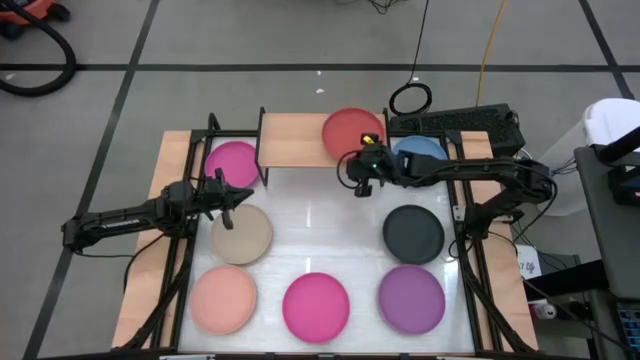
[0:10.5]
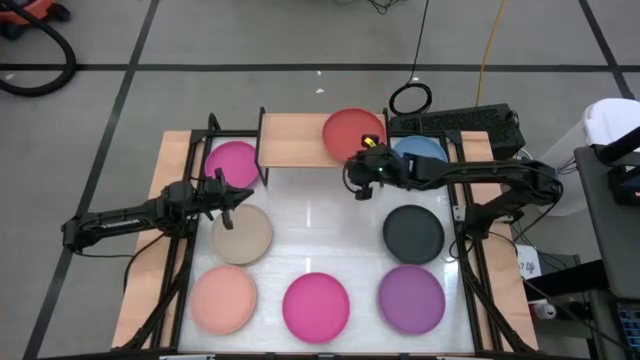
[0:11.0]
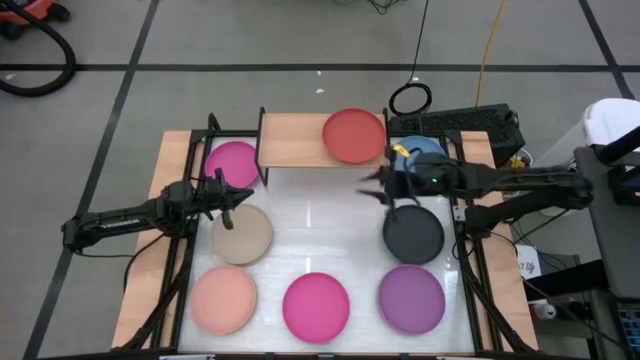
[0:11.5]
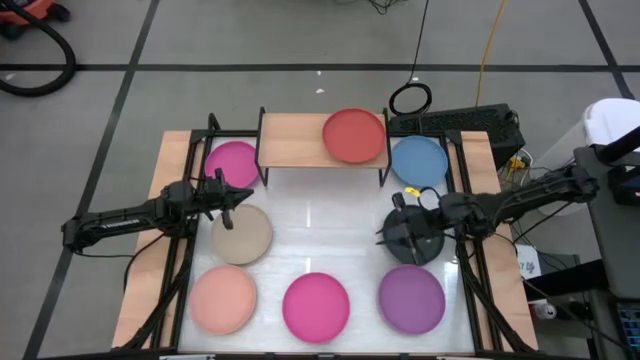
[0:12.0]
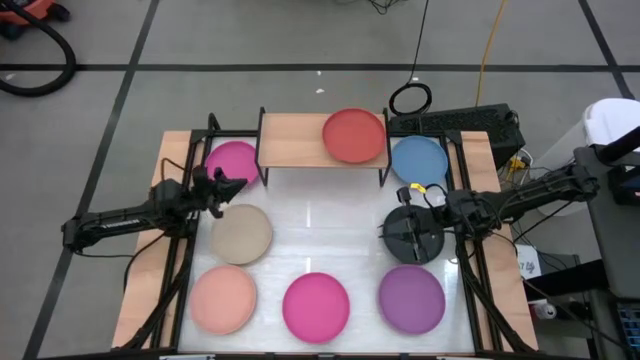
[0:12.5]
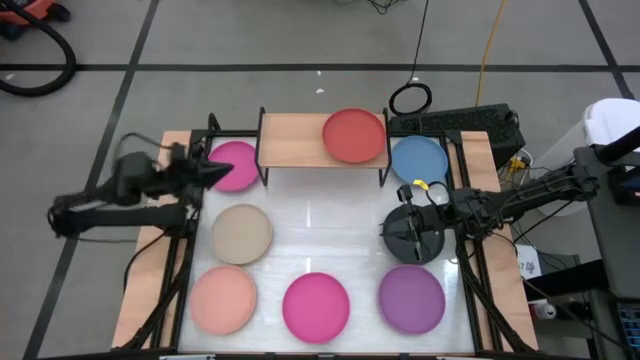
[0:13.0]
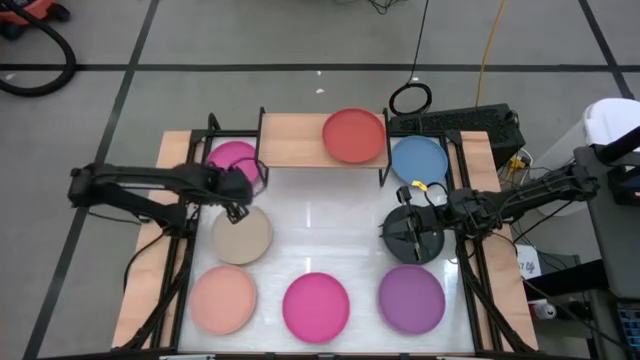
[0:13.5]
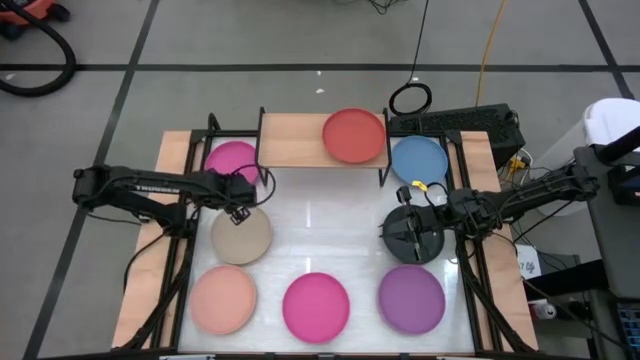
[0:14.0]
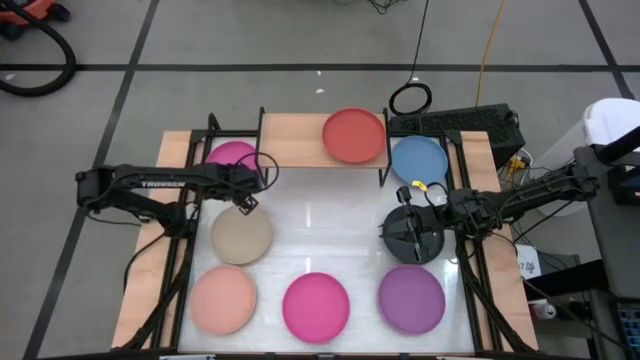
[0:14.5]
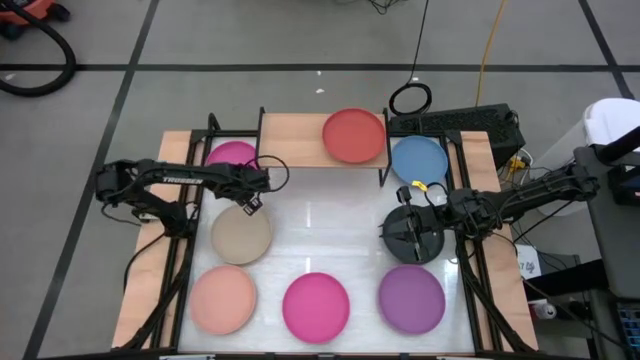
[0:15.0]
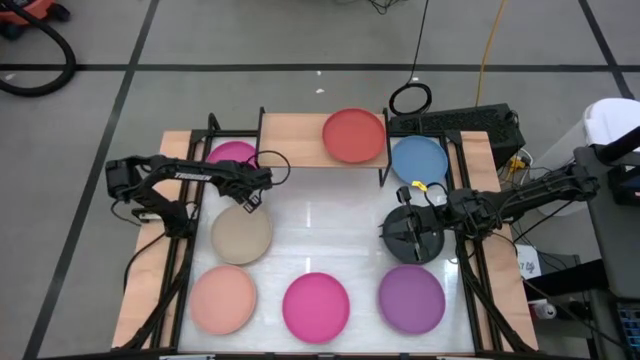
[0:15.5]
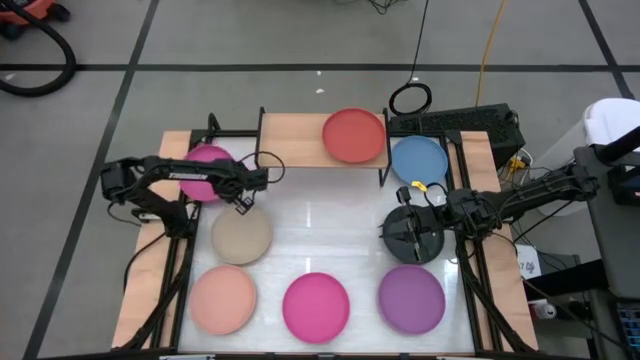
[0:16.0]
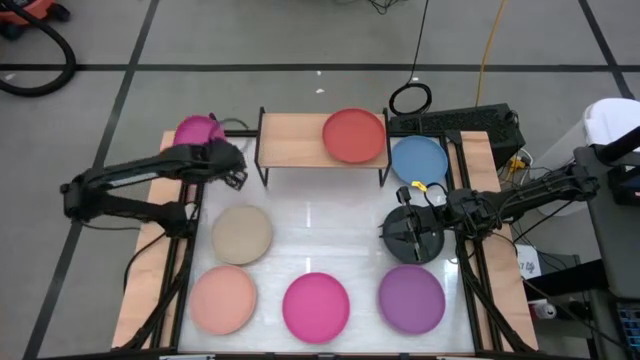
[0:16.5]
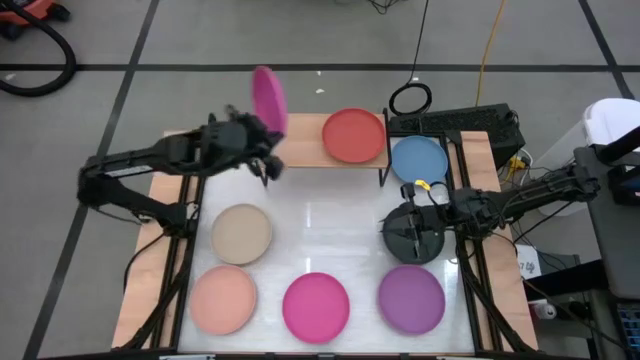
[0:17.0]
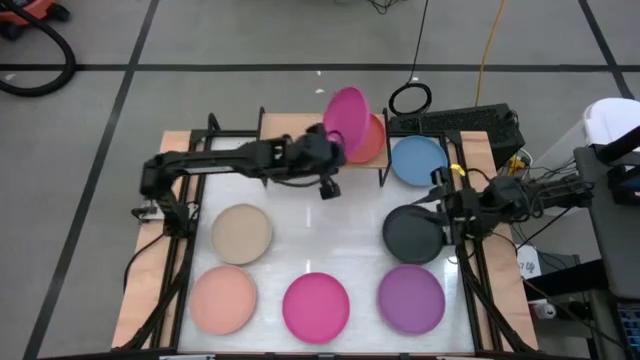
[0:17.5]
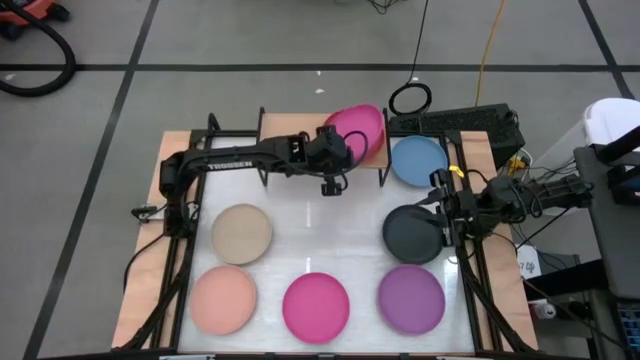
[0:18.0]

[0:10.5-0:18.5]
Task: Place and stack plates onto a shelf
Stack the top pink plate on the orange plate

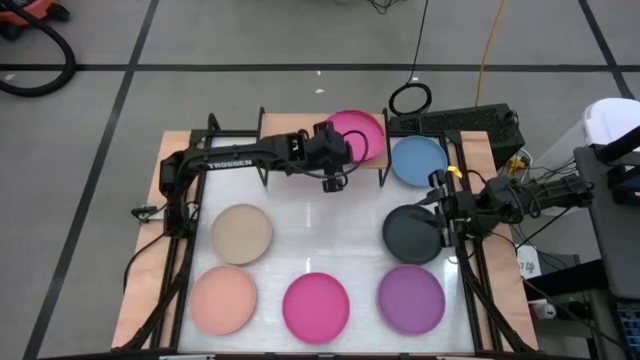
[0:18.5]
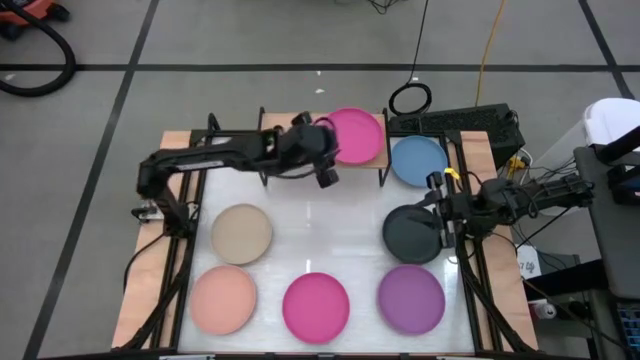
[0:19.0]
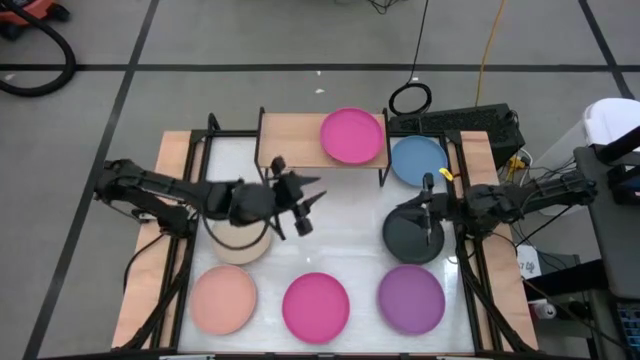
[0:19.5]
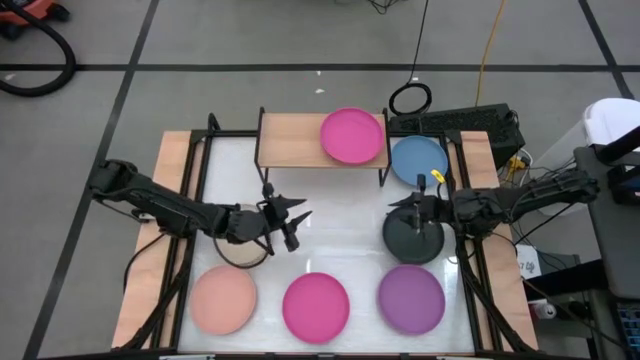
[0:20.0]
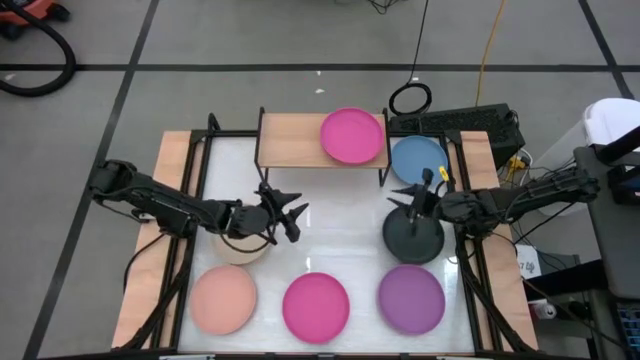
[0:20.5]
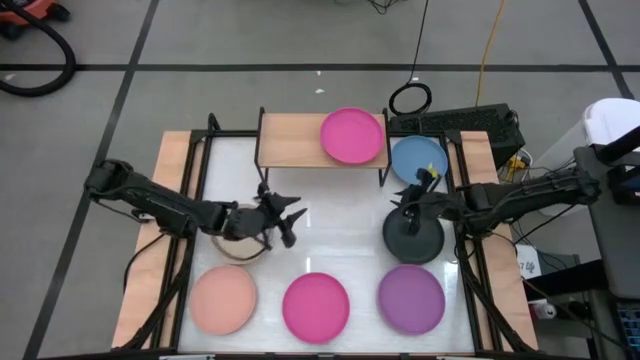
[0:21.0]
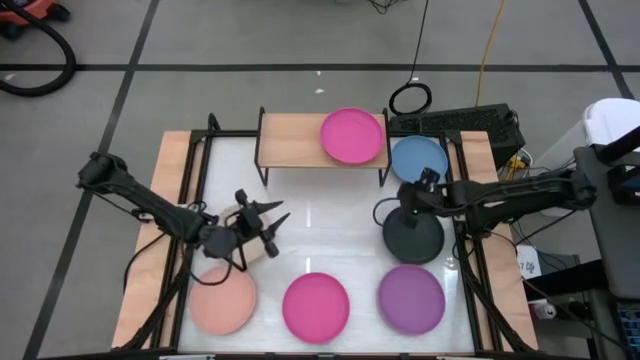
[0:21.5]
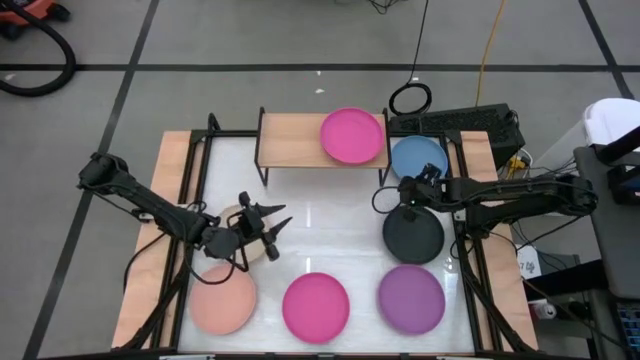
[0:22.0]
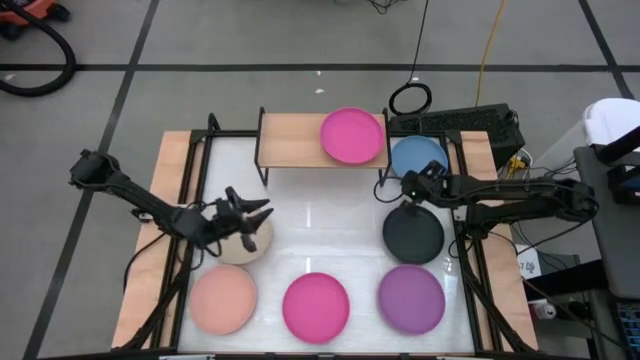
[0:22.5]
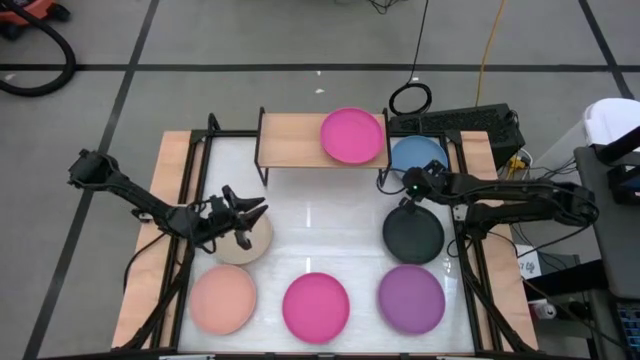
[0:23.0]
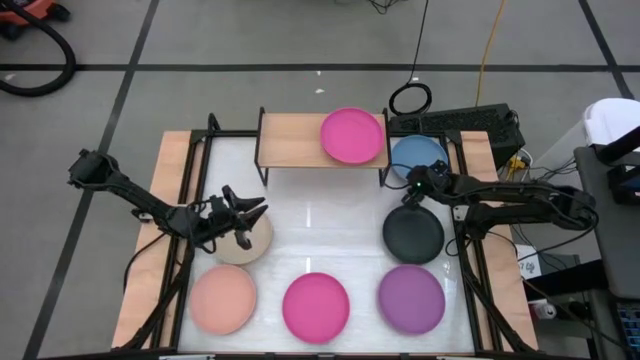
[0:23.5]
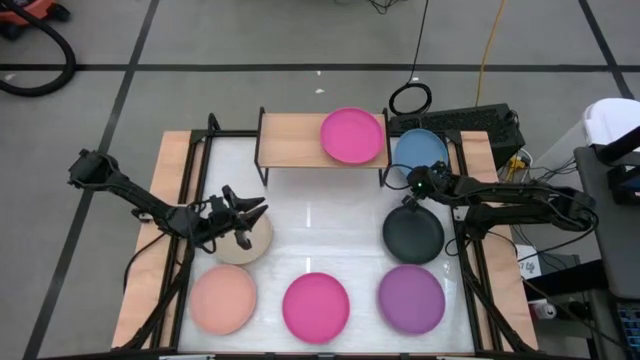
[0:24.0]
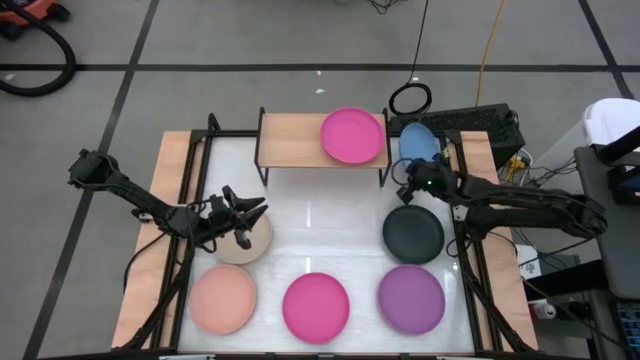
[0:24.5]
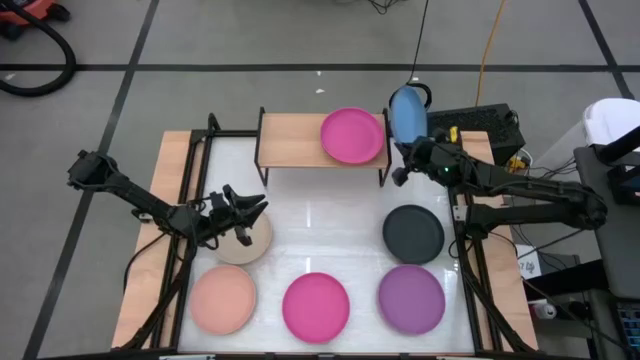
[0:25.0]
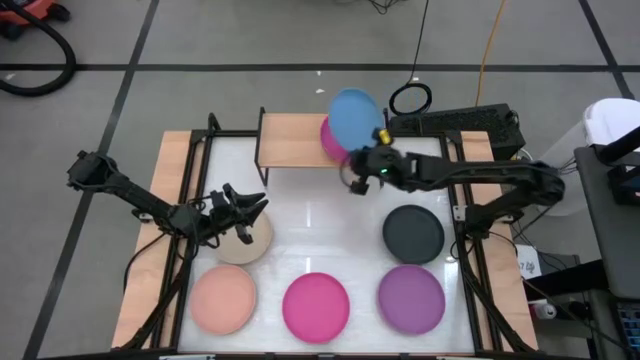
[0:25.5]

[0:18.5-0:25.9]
Stack the blue plate on the pink plate

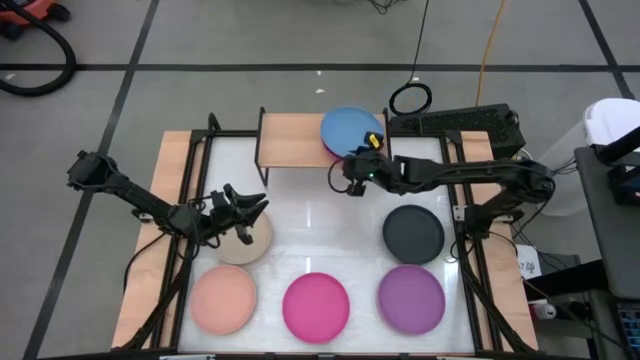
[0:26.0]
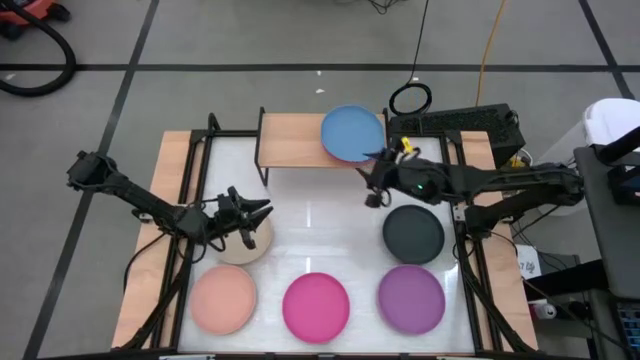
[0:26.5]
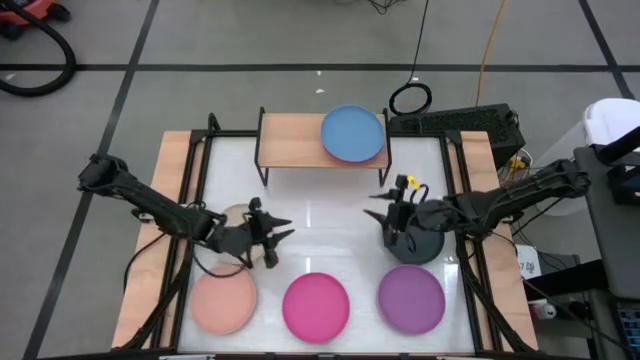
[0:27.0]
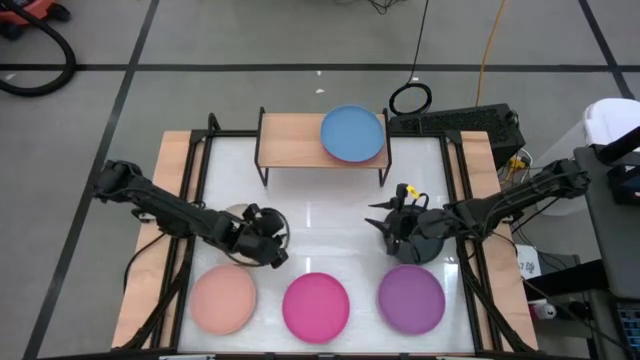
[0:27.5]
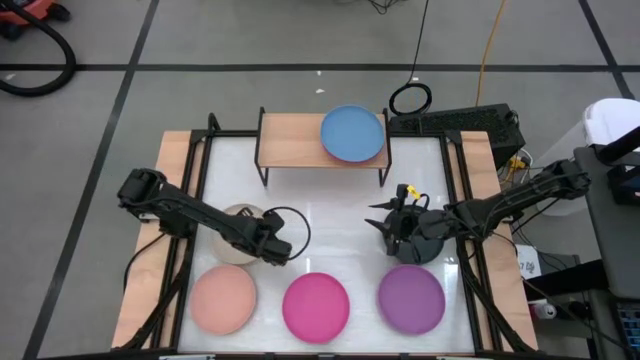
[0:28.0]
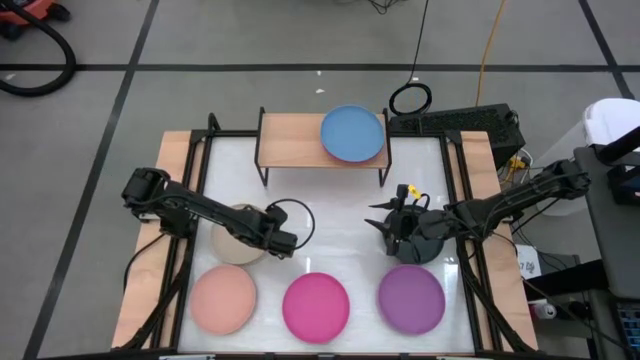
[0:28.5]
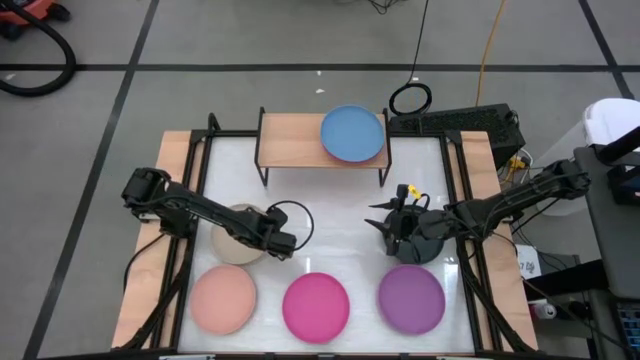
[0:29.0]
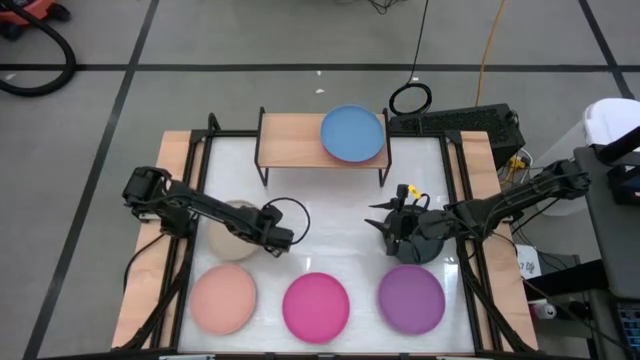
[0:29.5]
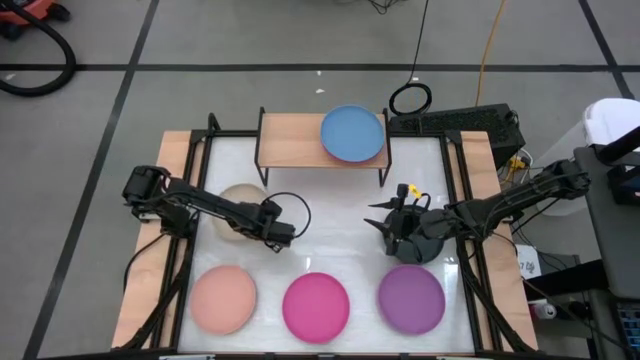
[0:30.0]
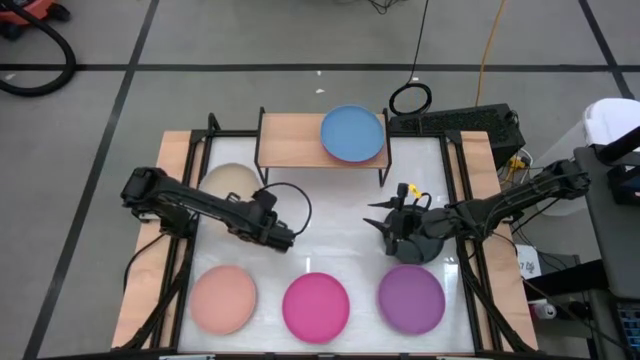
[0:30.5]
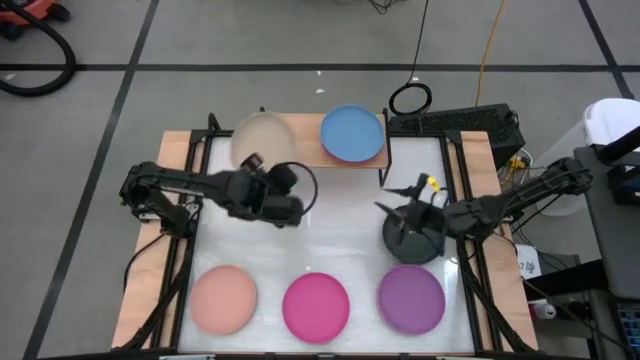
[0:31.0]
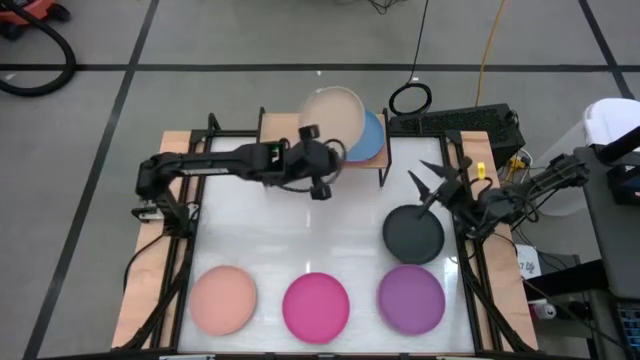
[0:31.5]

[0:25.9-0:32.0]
Stack the dark white plate on the blue plate
